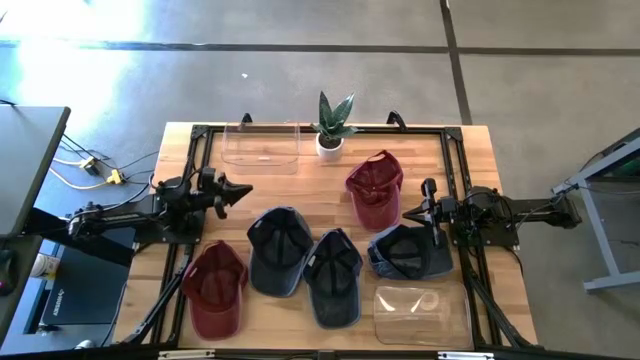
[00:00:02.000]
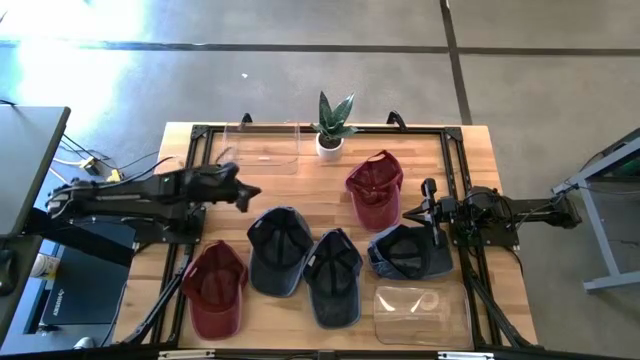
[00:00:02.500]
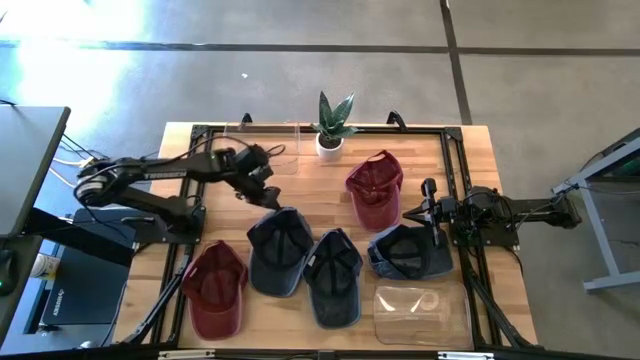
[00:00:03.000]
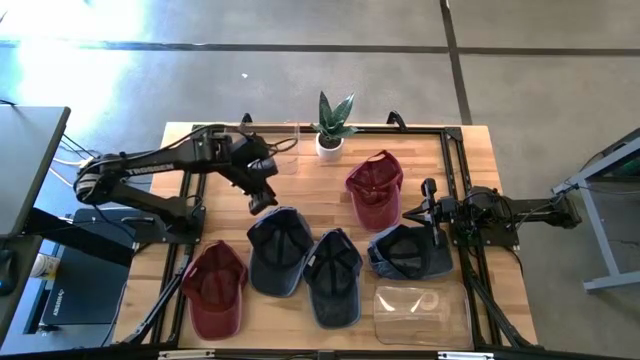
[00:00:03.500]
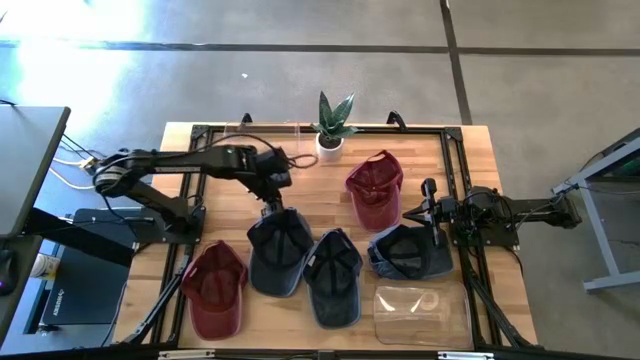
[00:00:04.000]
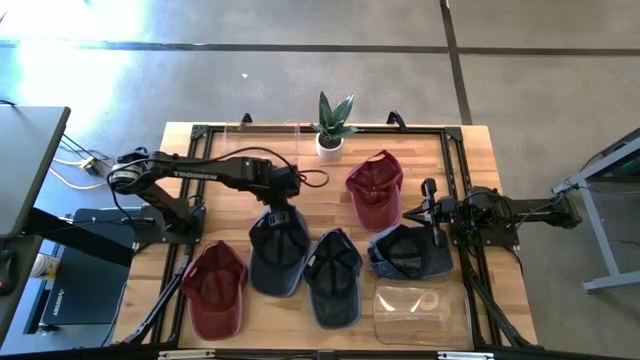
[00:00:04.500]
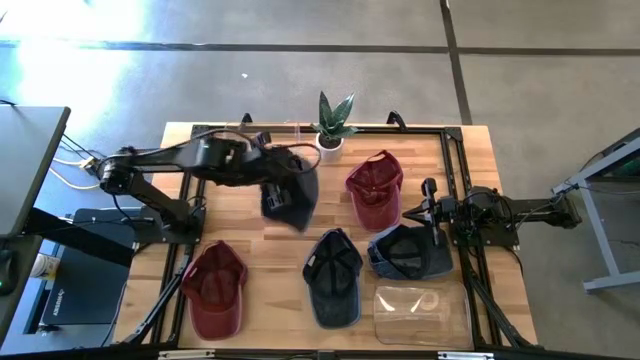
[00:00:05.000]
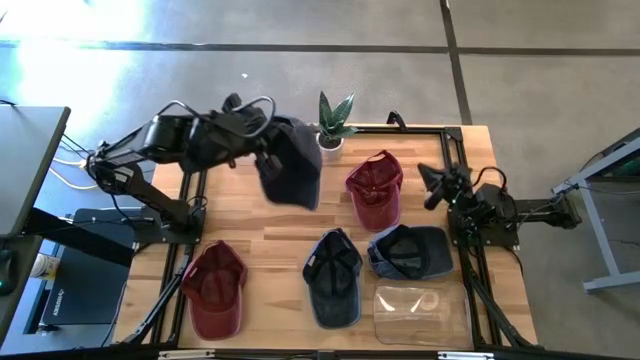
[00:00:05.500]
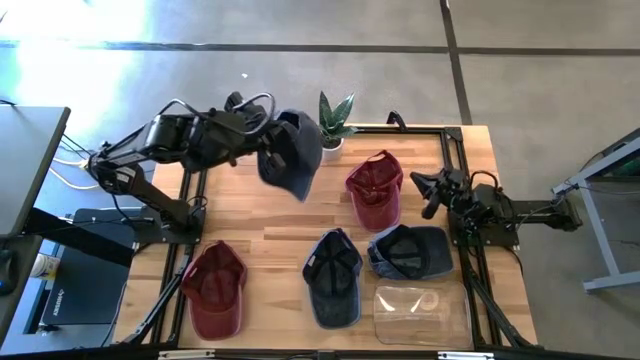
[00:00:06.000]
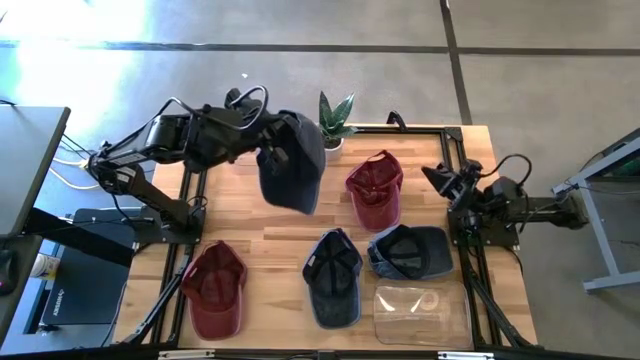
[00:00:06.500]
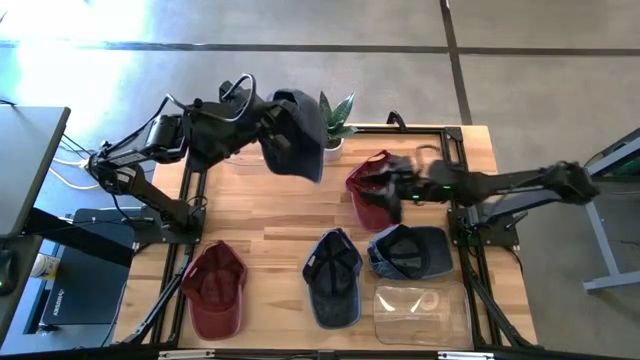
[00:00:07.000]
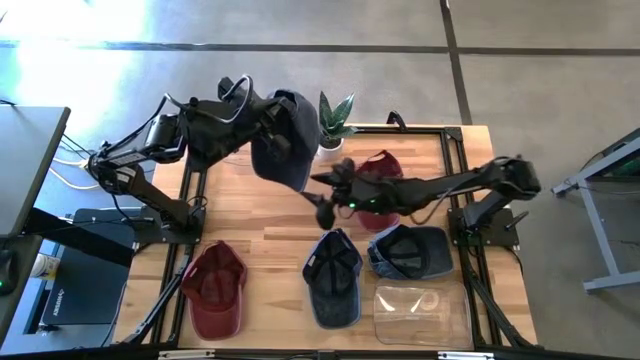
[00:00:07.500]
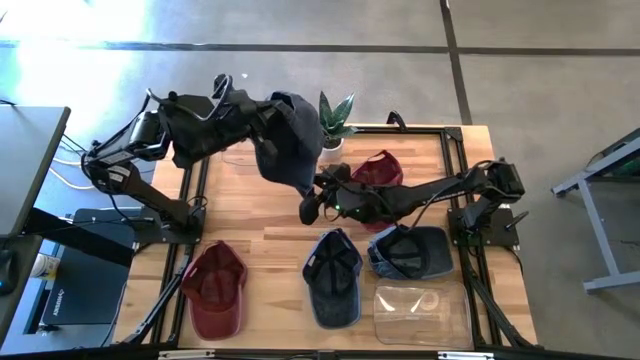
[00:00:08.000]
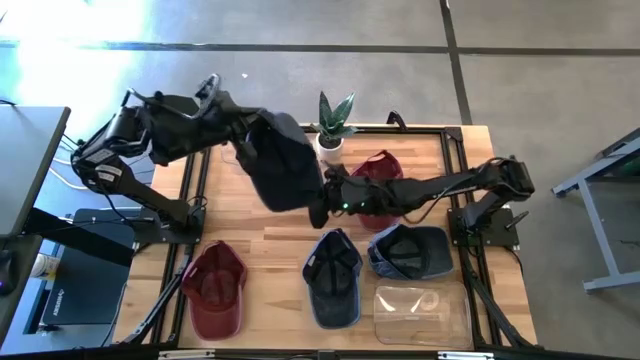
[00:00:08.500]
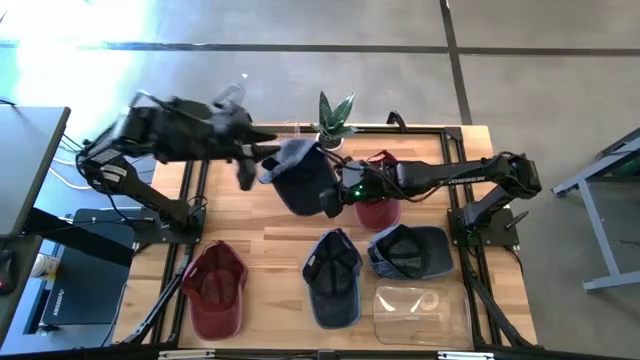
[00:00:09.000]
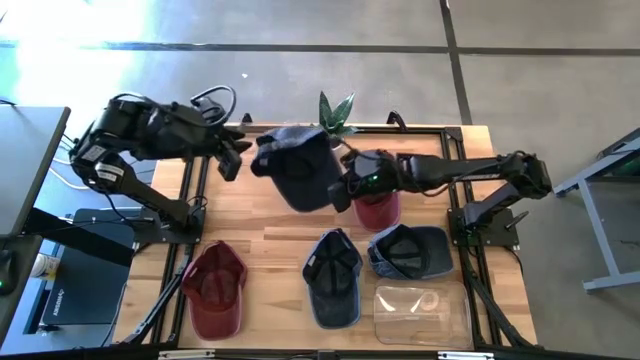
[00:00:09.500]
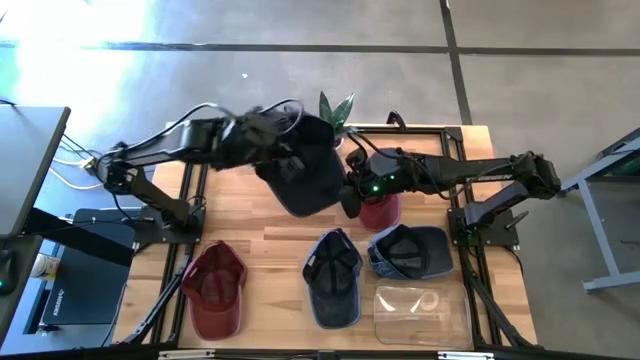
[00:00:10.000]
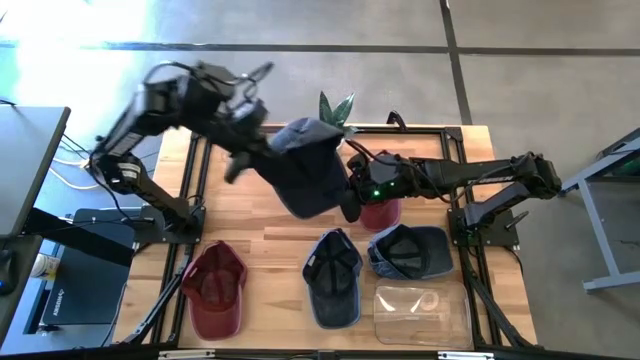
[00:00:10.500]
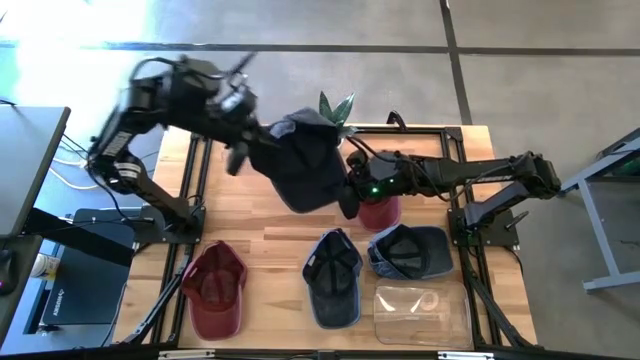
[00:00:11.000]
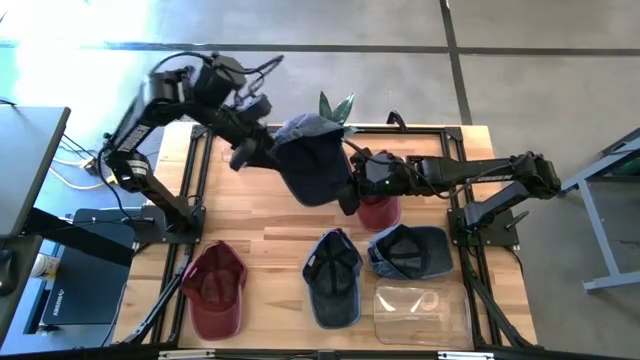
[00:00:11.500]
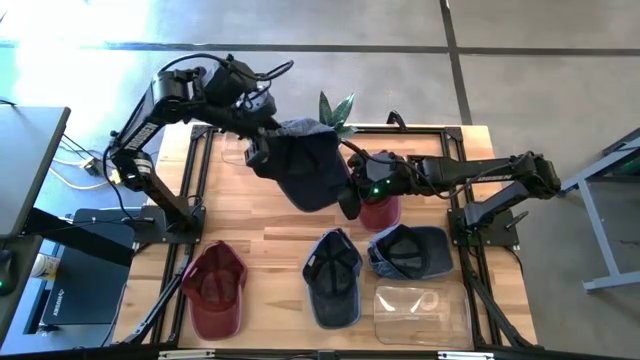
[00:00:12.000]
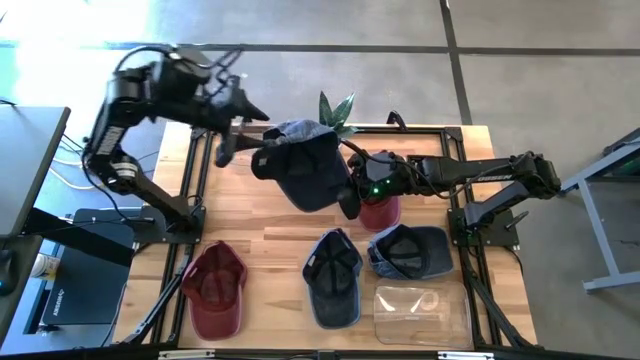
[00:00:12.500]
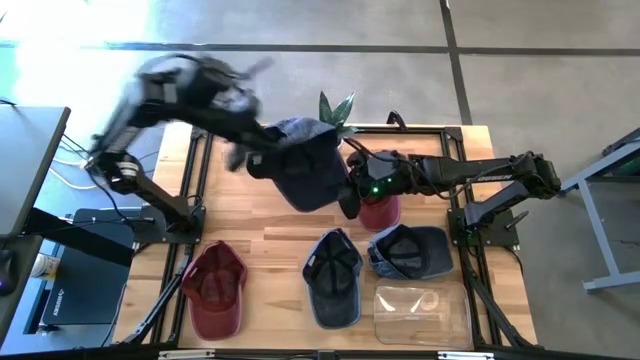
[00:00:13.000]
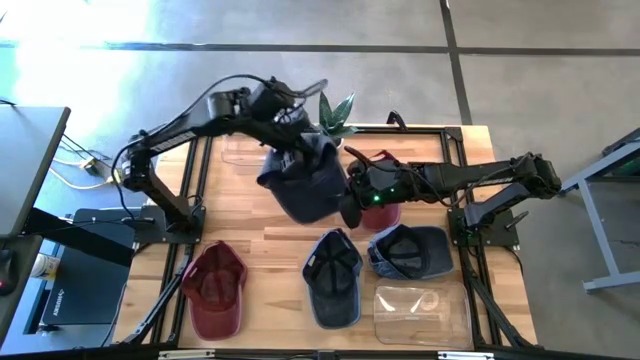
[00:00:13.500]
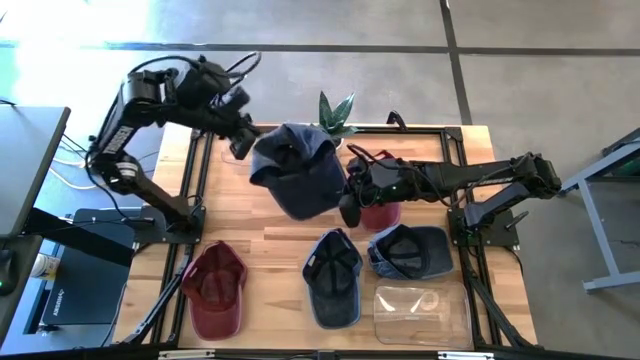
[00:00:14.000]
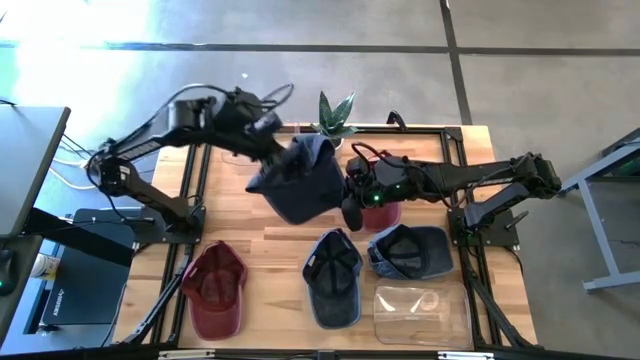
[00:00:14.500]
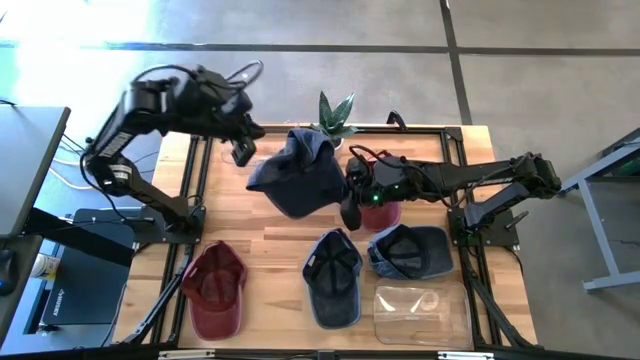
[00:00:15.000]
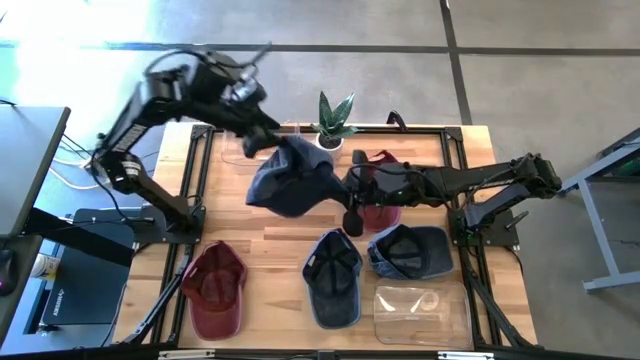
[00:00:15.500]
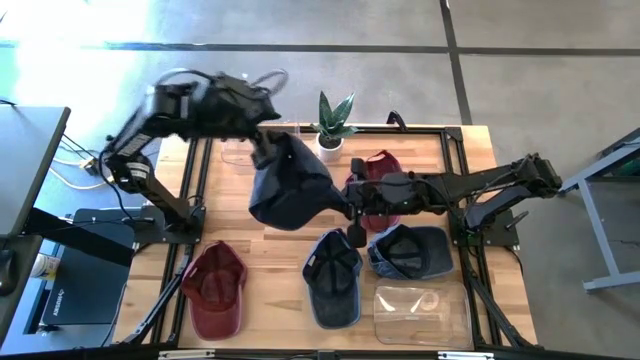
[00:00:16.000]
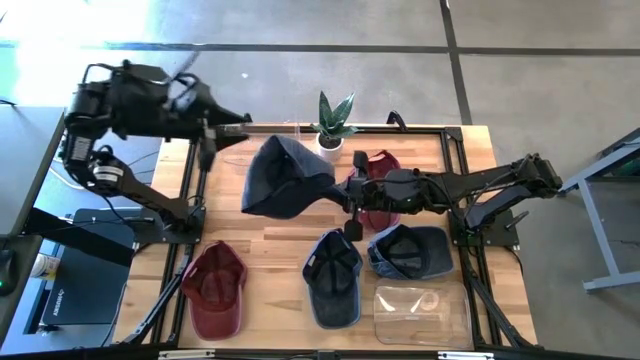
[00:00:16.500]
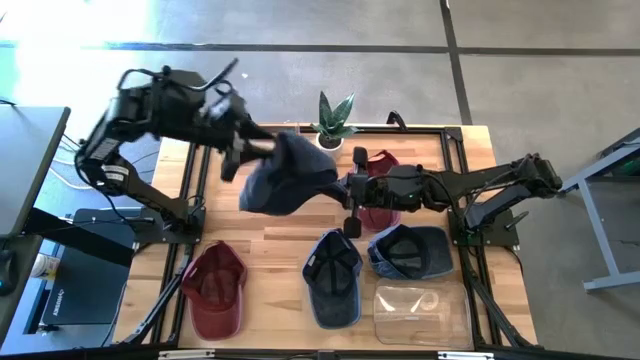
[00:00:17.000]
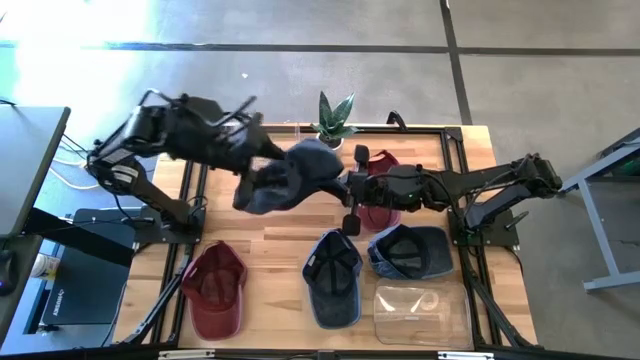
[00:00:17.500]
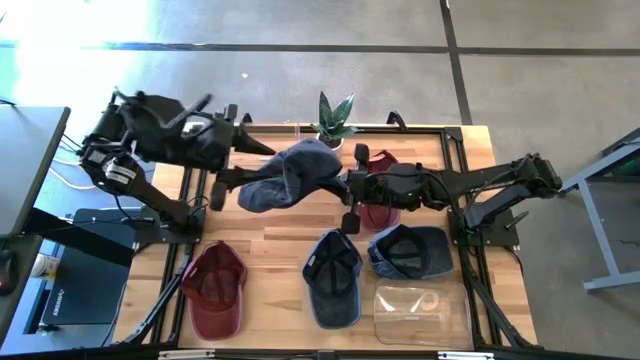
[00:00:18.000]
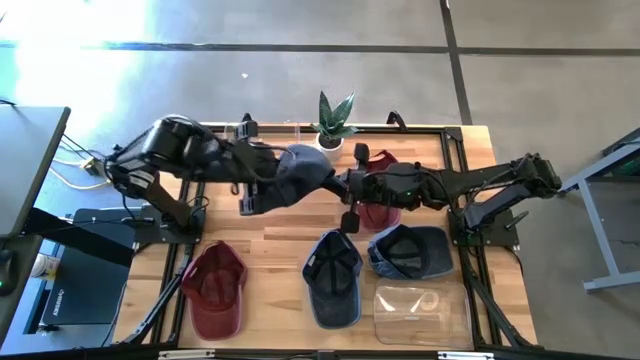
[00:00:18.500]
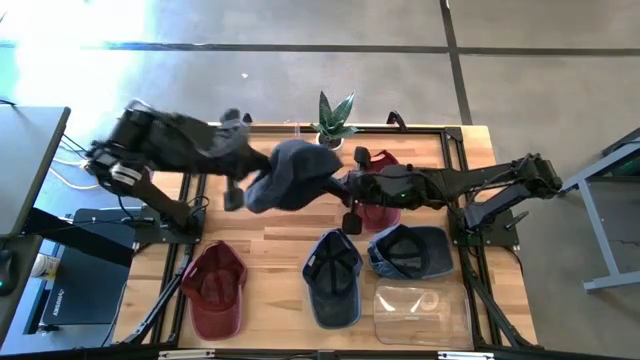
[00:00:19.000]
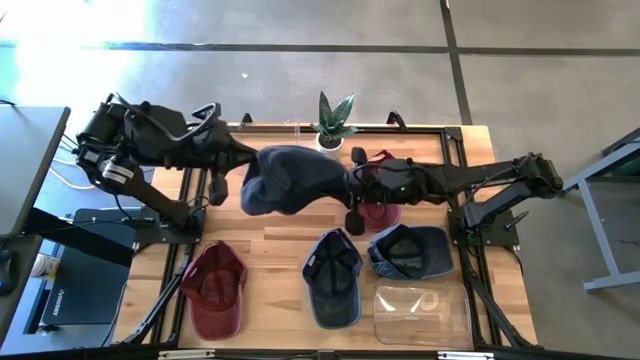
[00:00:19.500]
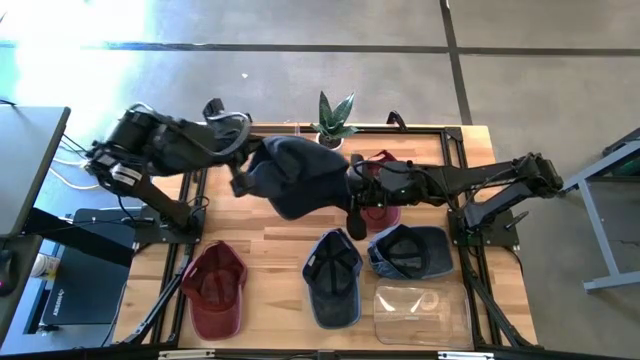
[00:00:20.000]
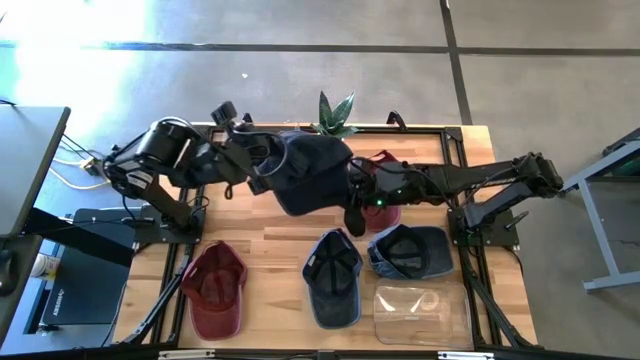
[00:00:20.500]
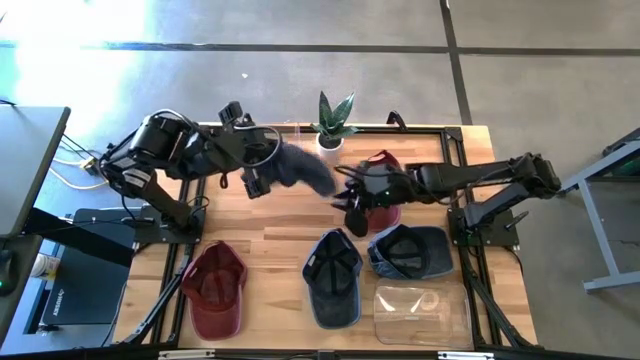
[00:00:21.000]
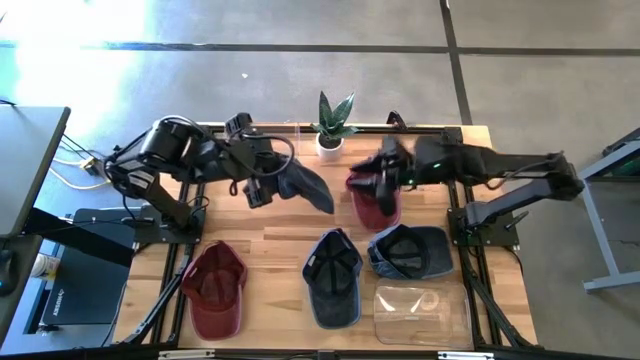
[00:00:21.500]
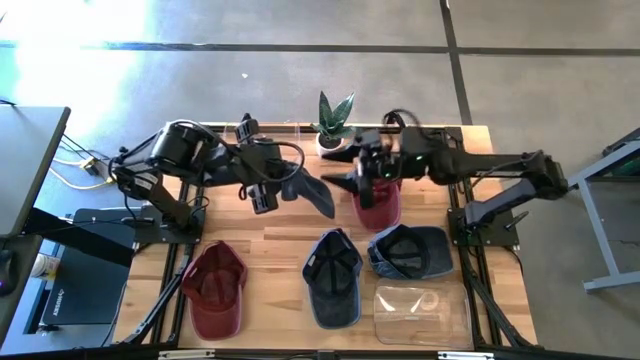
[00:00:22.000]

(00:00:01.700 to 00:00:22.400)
Task: Pick & Place hat
Put the left blue cap into the top transparent bin
